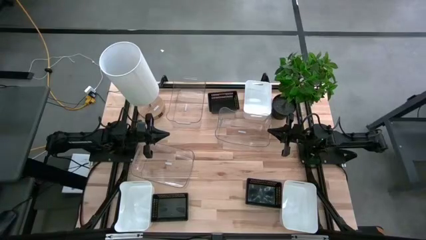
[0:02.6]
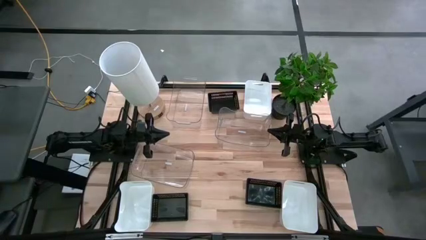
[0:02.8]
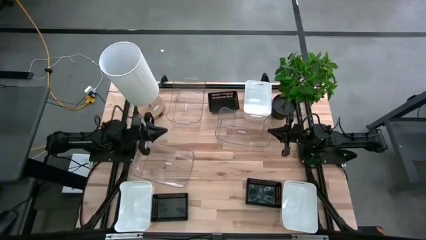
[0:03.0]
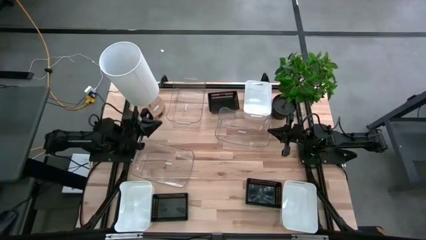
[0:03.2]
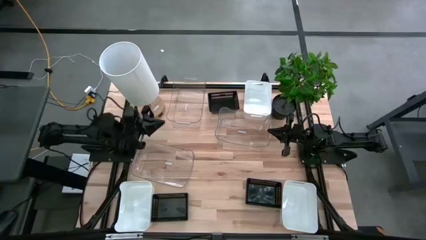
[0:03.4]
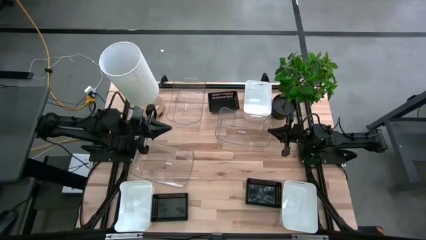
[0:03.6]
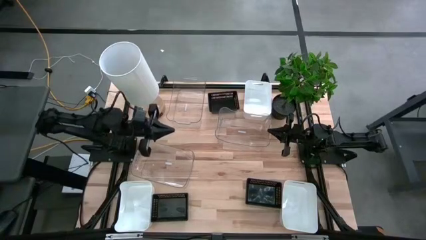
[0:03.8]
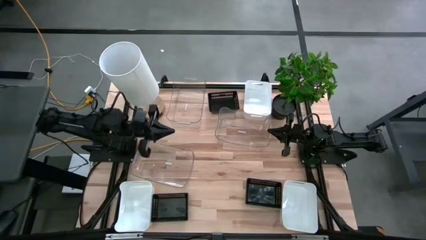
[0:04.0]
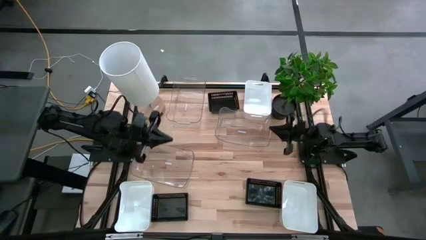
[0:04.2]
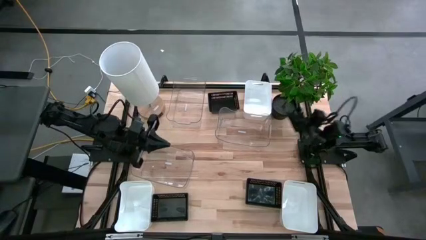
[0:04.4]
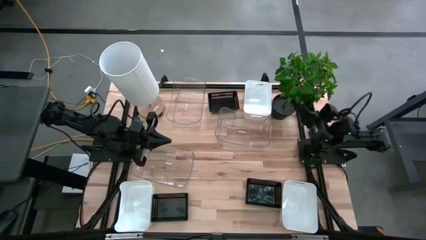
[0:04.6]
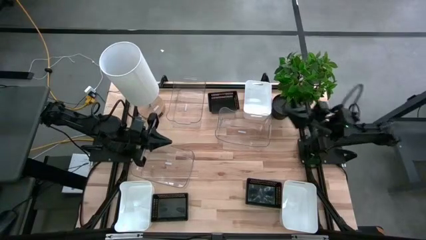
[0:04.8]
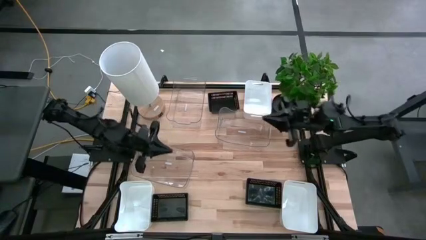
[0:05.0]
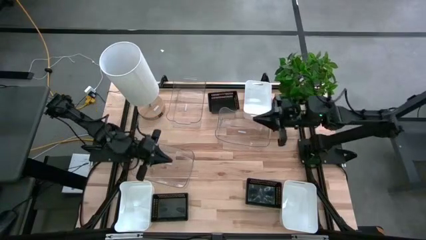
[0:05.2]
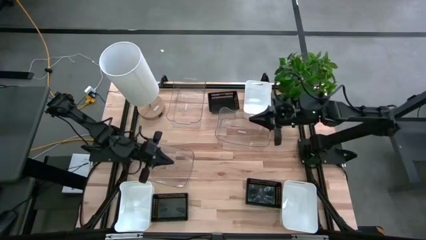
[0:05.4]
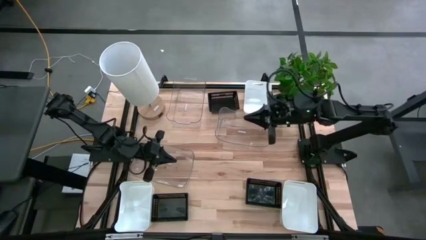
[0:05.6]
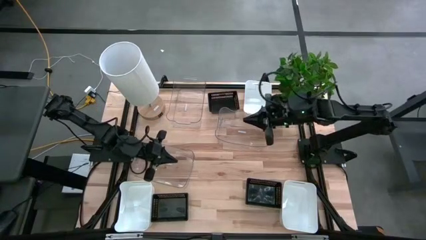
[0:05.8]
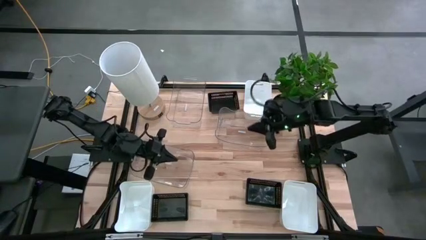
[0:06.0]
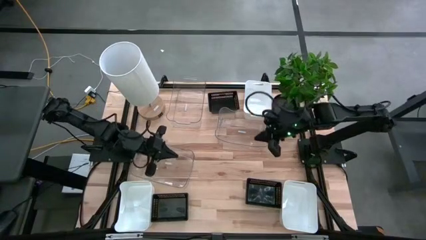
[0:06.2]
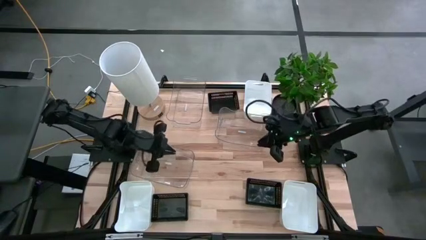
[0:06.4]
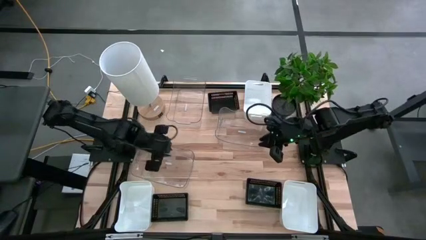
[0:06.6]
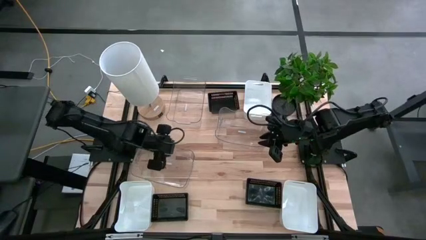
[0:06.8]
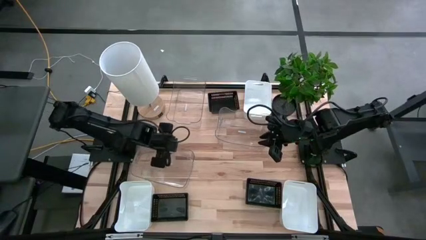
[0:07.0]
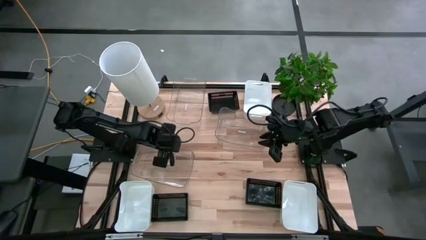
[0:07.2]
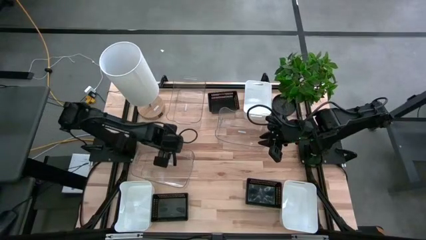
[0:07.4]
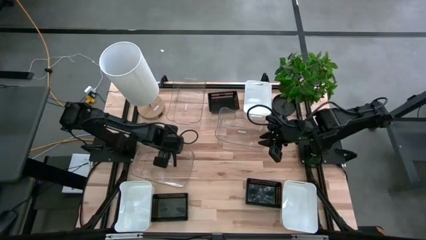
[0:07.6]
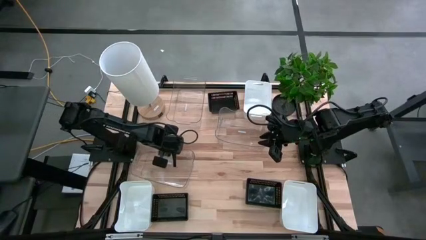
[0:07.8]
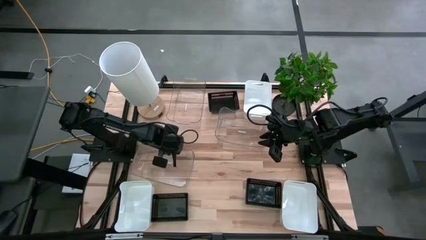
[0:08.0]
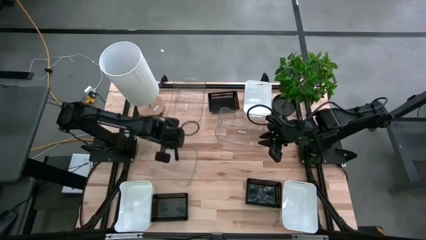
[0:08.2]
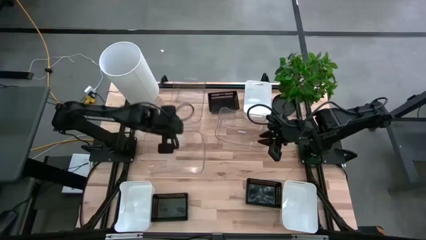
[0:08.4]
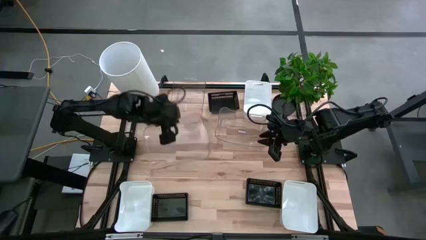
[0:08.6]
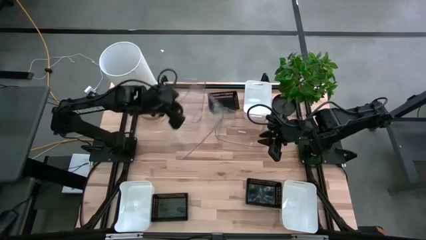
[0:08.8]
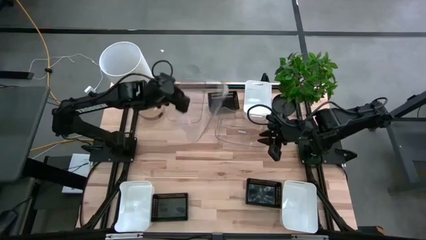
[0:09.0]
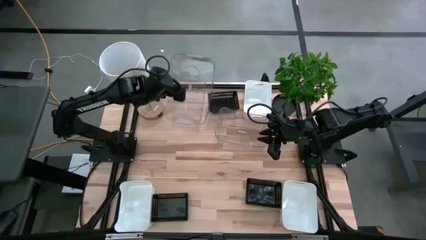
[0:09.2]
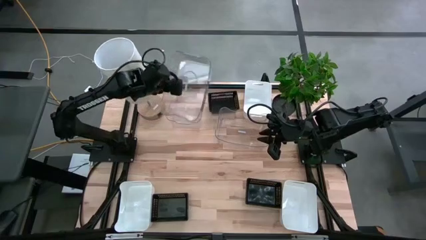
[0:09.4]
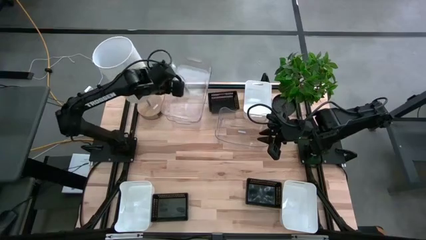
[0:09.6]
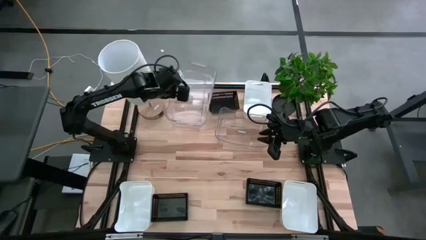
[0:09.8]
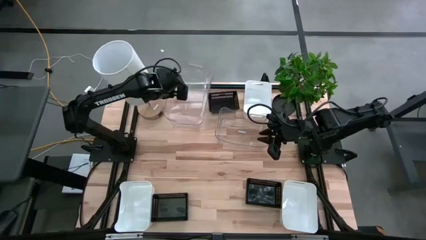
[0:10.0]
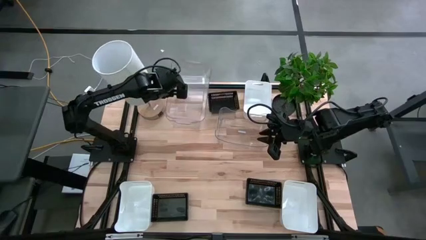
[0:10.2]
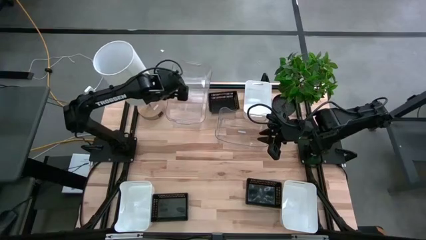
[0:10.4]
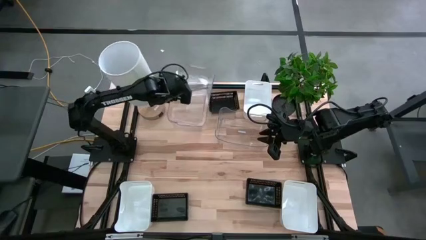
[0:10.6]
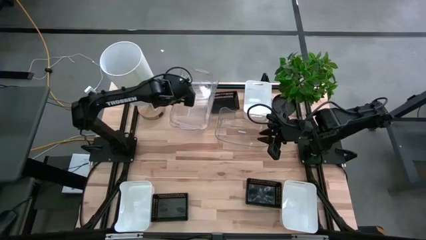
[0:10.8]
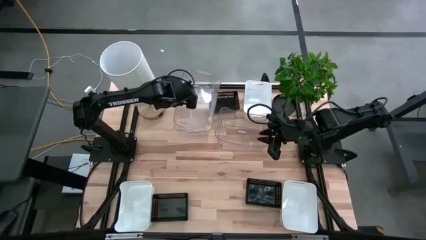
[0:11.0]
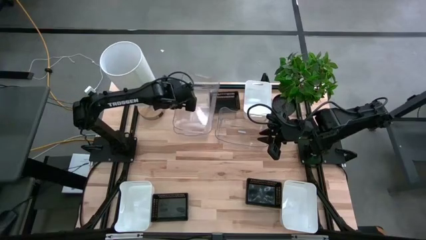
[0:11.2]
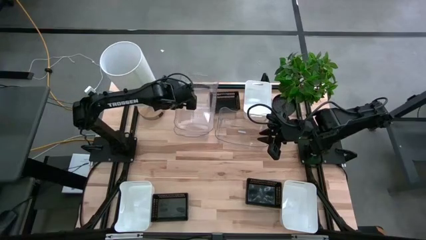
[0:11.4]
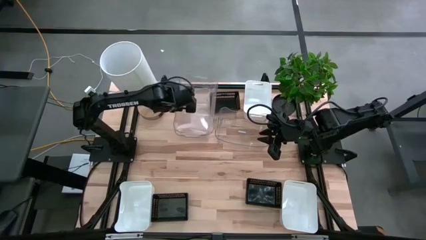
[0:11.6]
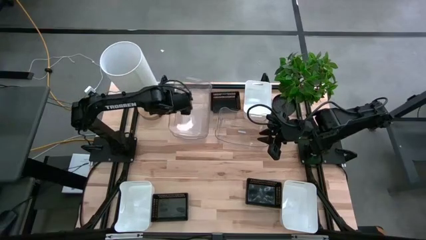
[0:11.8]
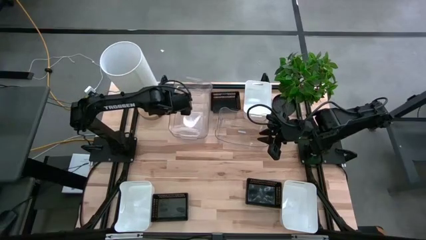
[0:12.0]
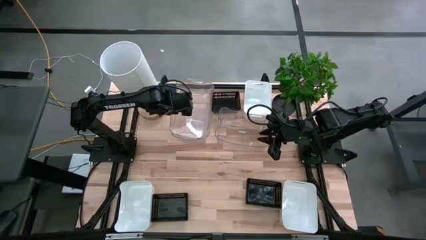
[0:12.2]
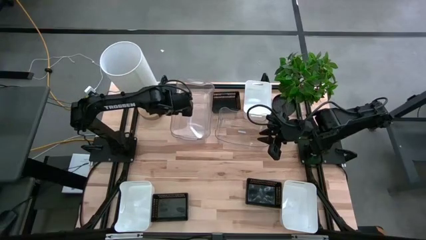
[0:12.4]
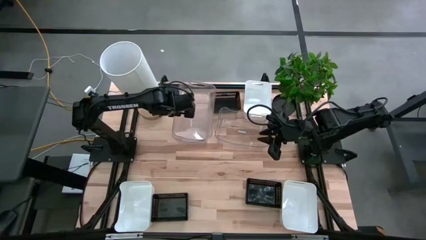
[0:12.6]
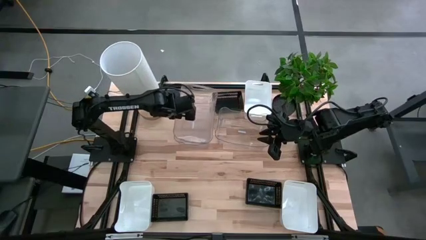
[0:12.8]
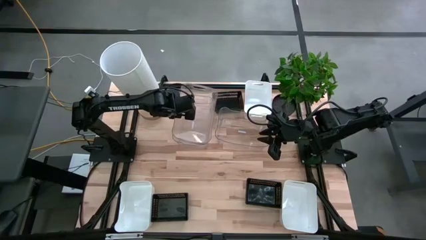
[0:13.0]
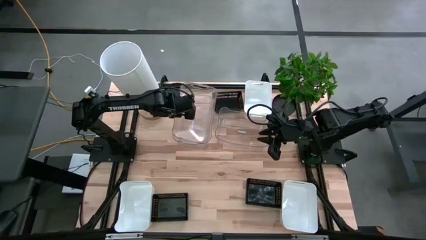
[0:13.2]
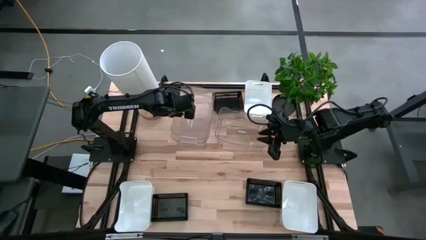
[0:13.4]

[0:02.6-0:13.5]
Stack the bottom transparent bin on top of the top transparent bin
